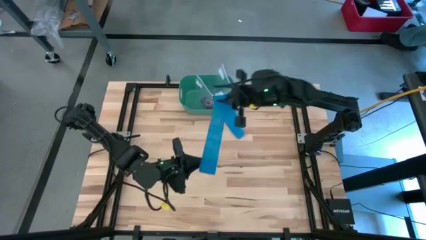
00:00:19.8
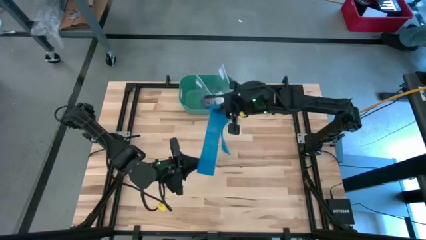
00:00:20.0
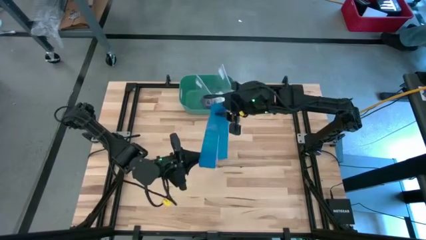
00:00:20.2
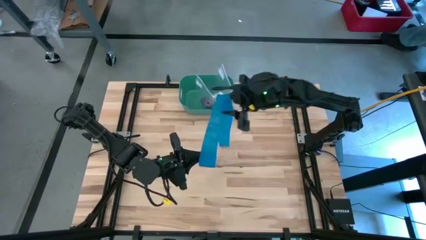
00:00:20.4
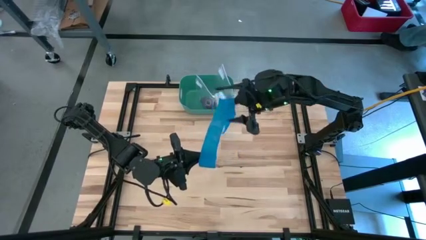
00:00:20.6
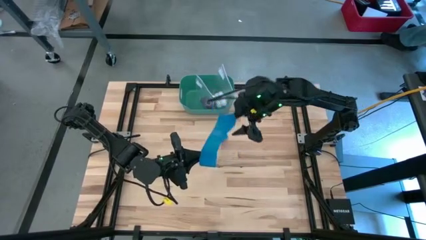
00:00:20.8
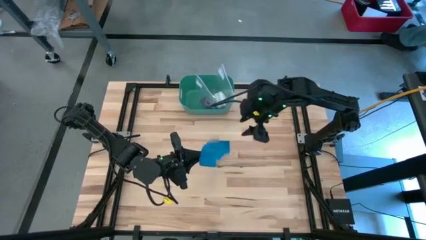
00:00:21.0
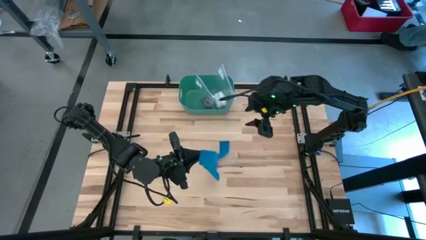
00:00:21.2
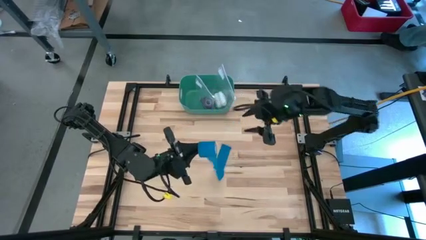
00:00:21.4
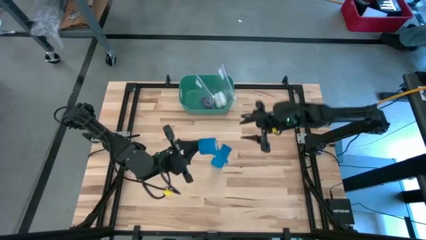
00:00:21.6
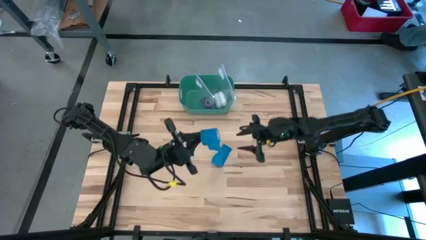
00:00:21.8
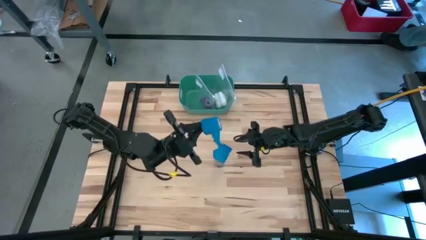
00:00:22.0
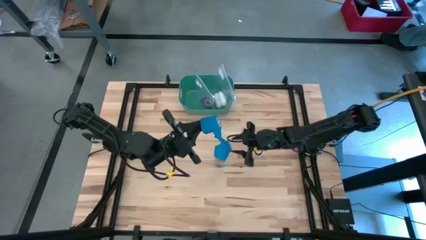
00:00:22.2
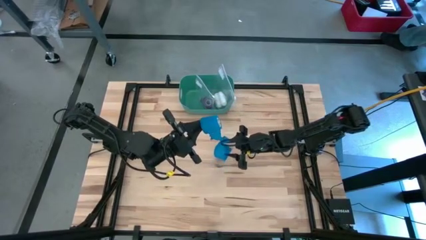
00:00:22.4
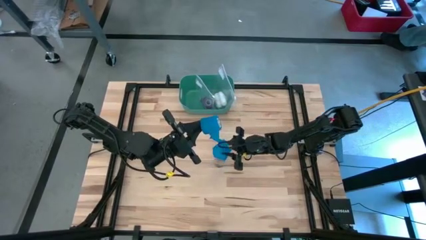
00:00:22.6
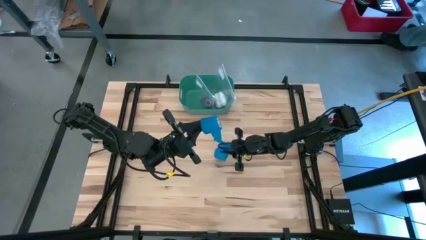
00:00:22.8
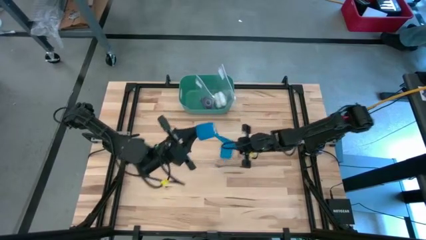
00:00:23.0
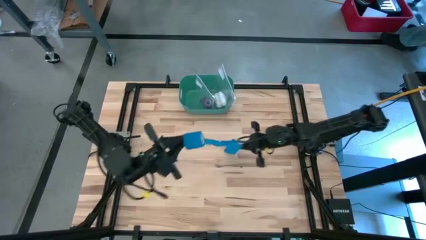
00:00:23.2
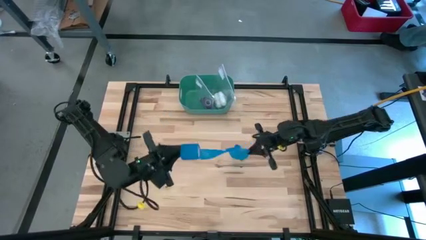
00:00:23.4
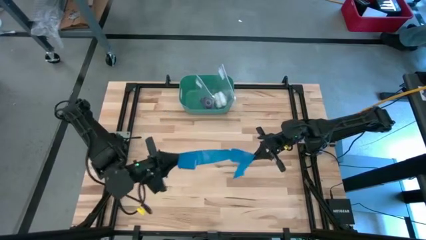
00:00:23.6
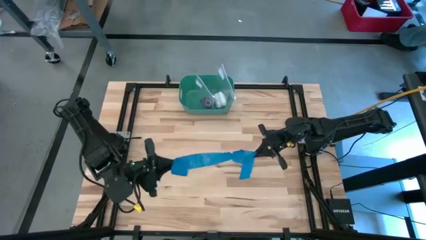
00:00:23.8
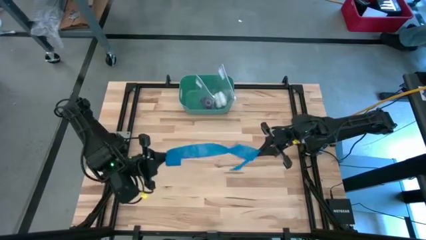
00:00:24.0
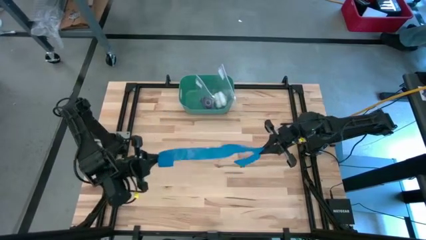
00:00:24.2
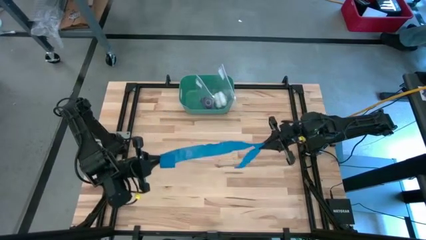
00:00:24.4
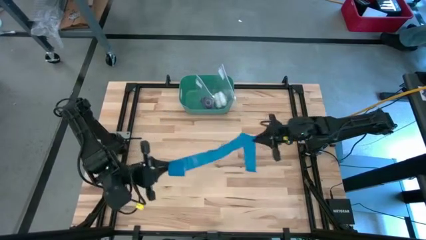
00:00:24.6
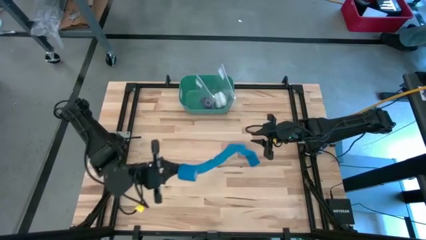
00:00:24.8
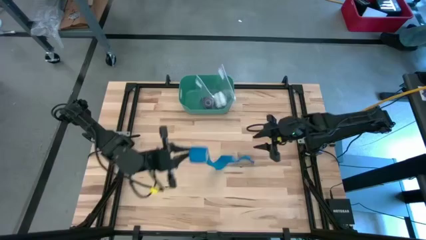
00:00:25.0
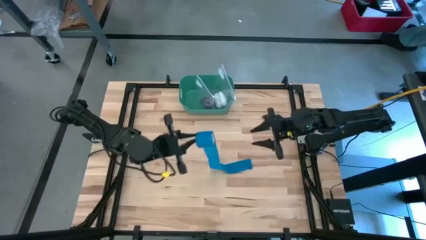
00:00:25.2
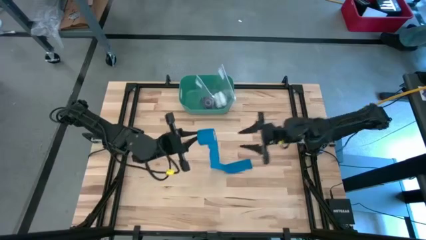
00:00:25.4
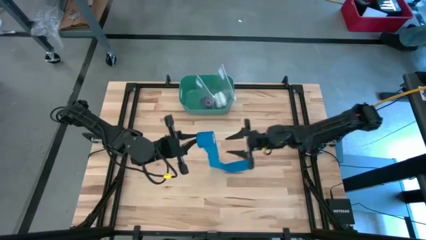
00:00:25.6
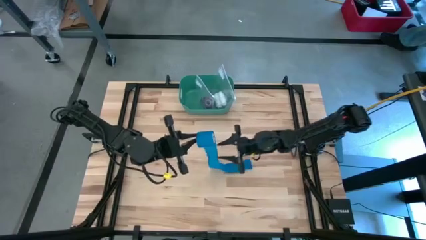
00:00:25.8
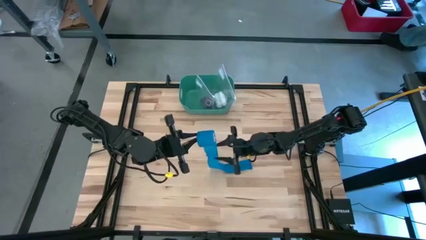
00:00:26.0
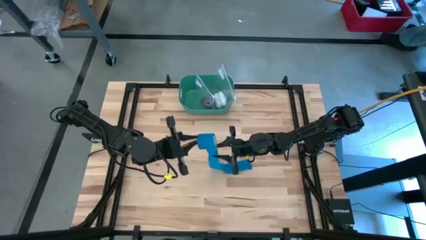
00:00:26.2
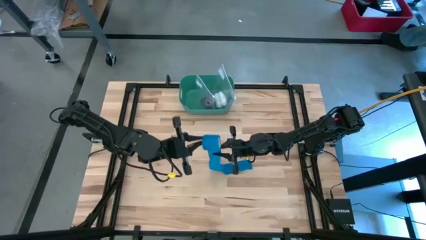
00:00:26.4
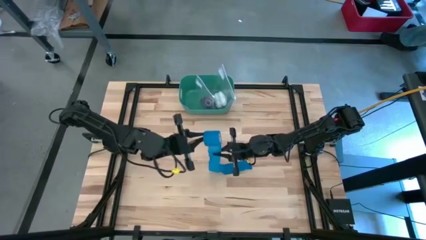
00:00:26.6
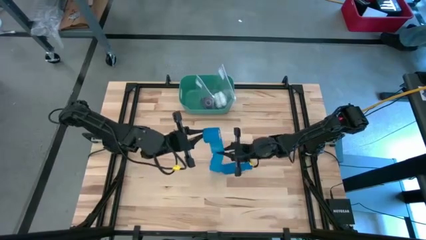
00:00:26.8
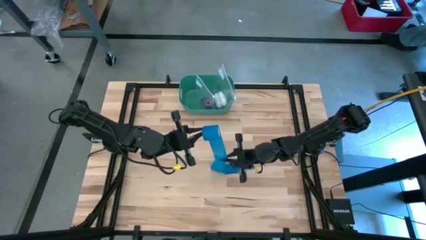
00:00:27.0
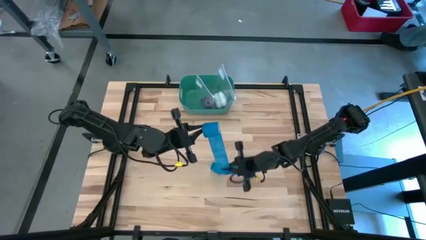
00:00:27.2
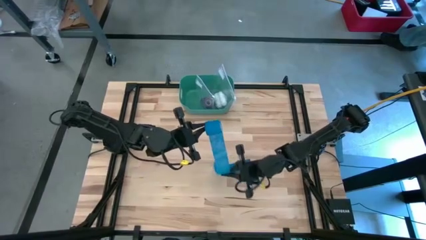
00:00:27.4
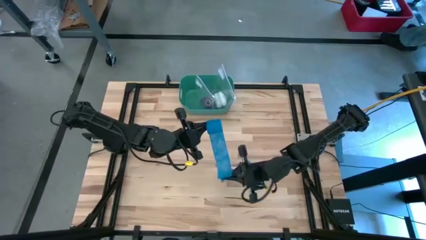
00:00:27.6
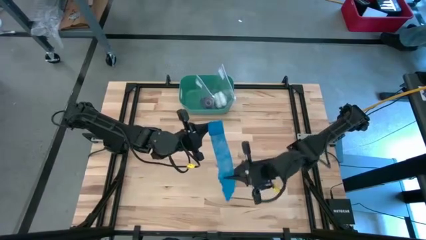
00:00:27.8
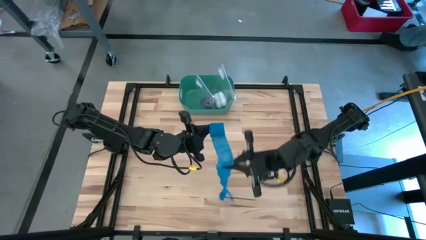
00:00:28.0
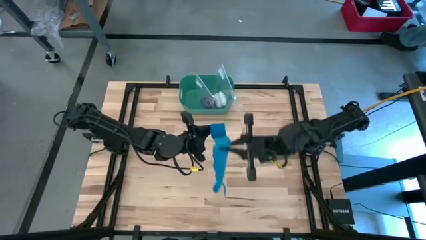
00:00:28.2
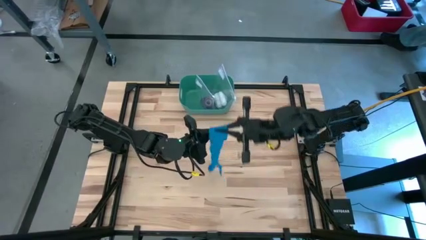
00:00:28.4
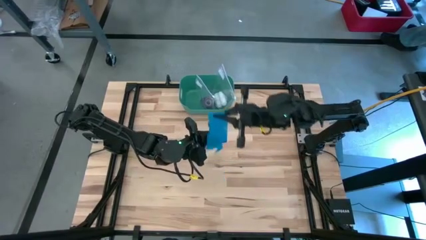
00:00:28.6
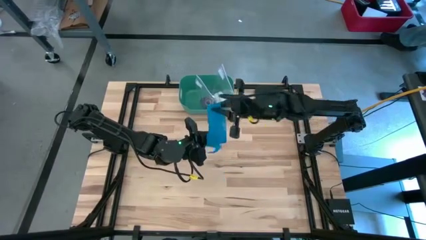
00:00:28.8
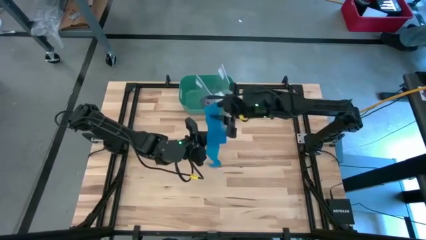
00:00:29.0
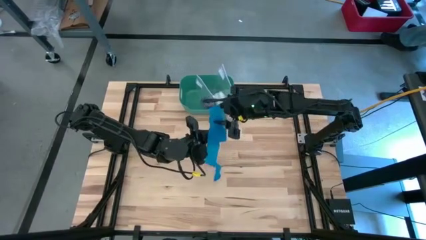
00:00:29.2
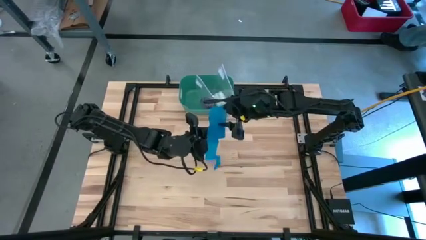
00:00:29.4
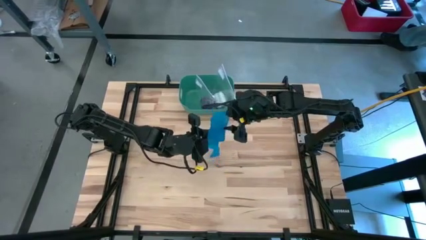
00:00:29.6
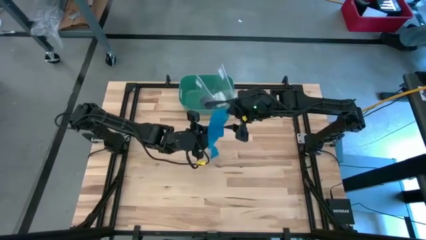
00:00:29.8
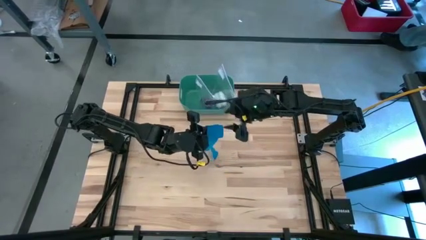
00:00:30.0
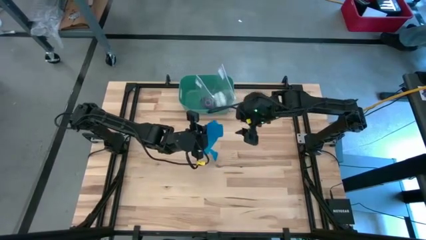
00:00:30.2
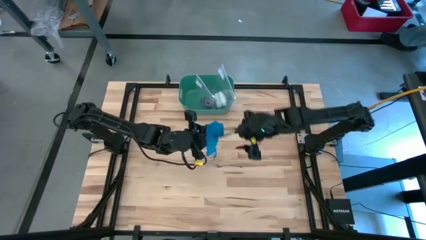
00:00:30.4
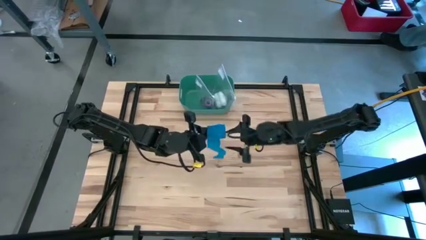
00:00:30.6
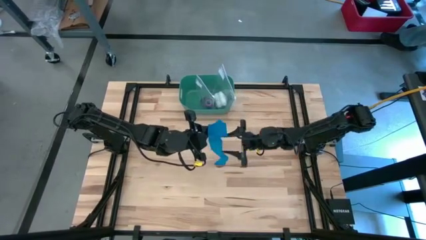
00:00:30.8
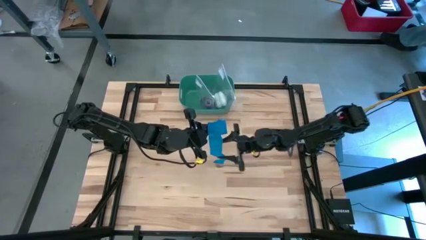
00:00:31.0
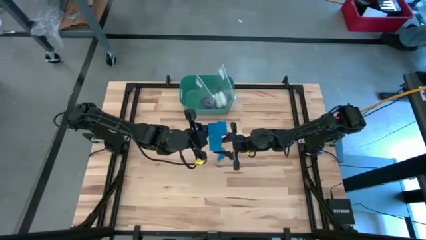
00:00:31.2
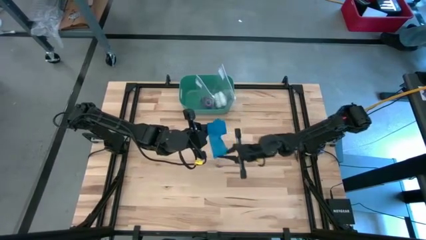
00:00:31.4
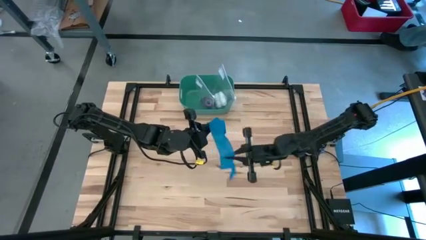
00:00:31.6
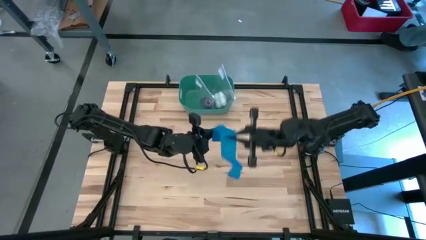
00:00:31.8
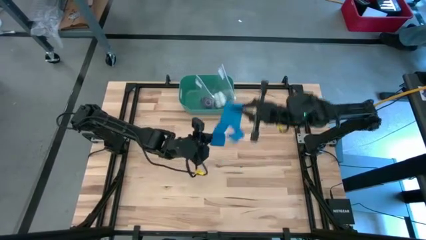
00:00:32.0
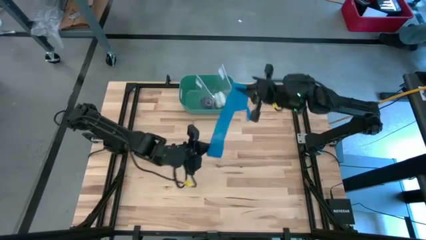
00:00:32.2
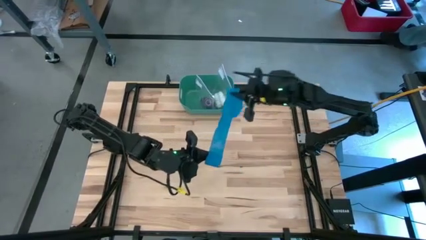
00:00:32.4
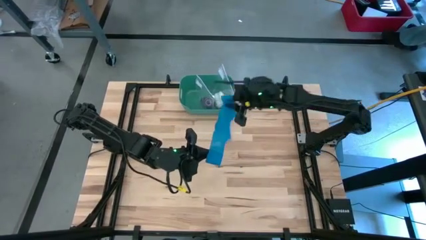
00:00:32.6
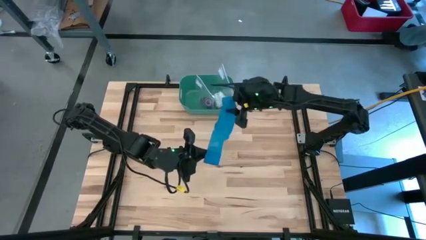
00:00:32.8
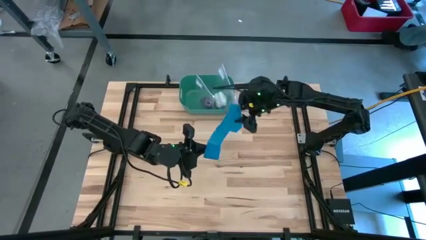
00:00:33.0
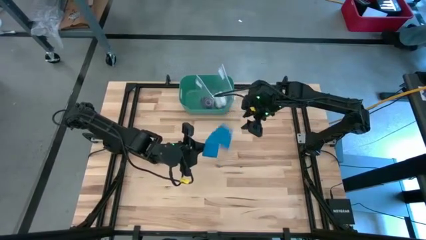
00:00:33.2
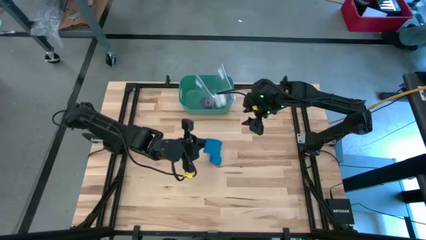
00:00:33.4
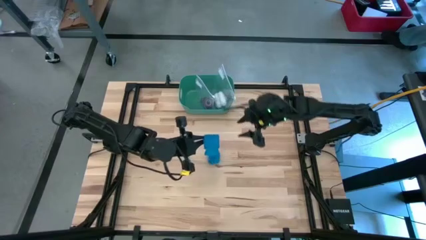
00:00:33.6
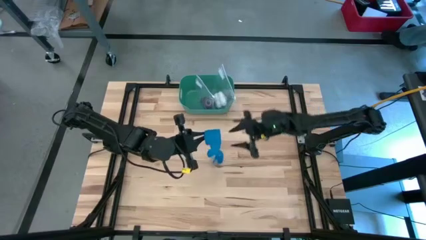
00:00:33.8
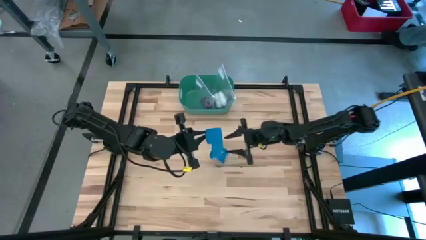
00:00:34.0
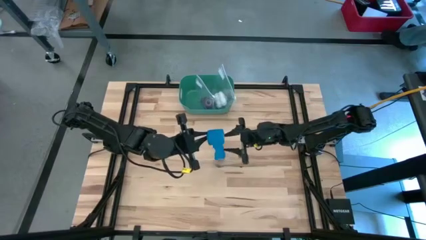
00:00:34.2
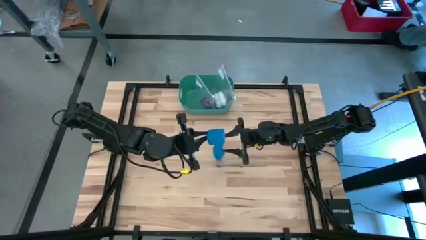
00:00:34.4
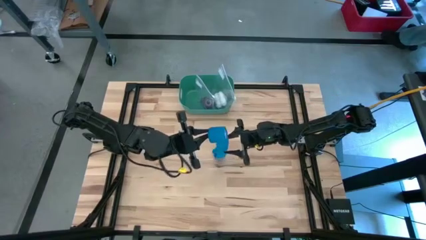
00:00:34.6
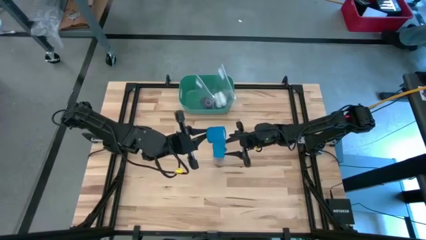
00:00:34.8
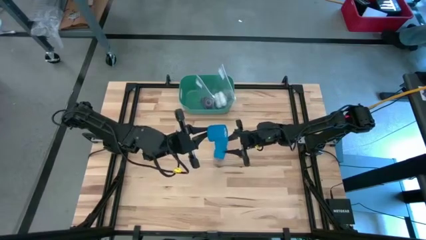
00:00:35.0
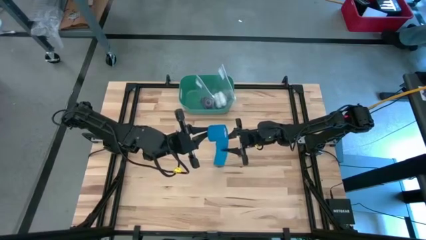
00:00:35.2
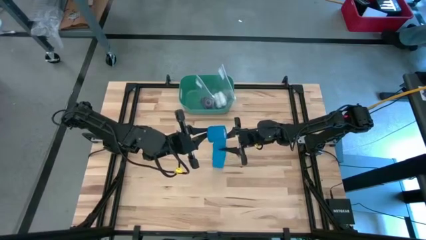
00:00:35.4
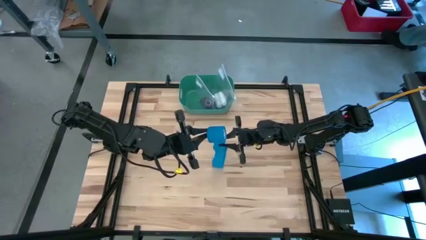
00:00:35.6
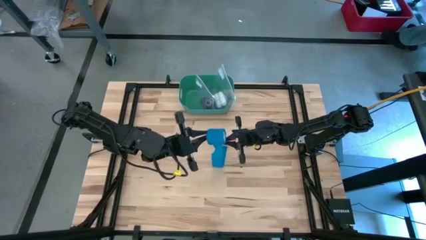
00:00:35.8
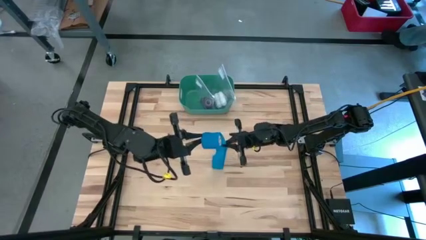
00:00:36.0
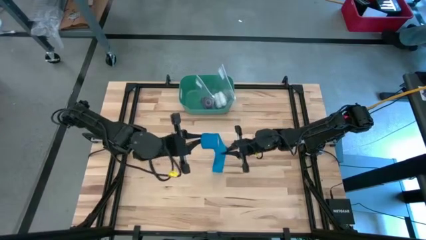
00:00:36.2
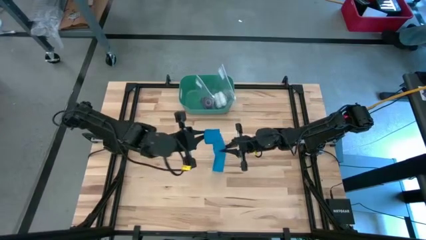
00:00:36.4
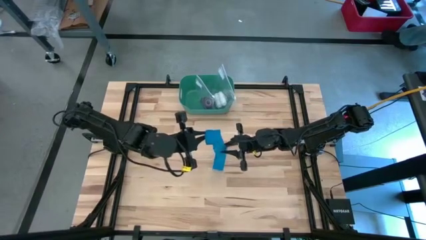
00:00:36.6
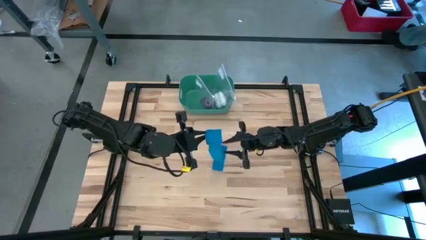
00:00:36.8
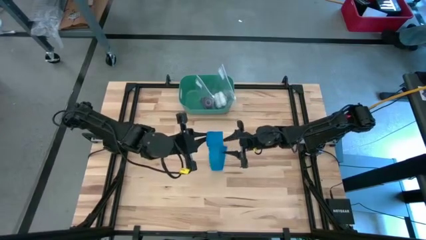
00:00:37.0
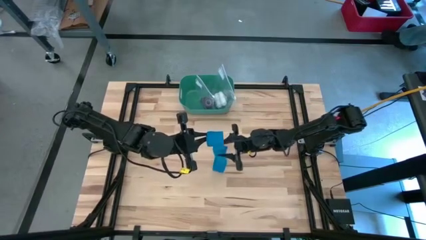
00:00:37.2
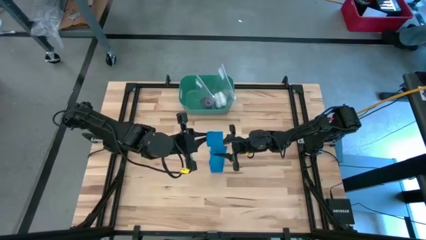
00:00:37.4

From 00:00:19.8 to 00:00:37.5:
Task: Roll bandage
Roll the blue bandage
